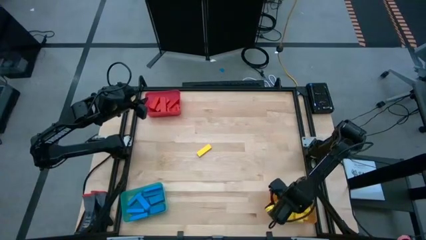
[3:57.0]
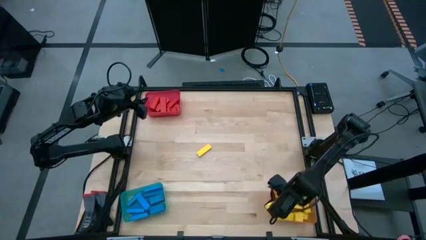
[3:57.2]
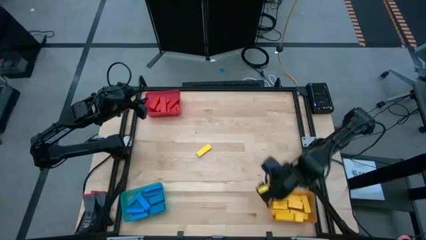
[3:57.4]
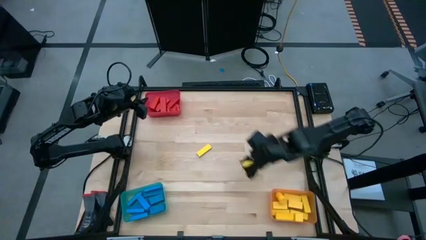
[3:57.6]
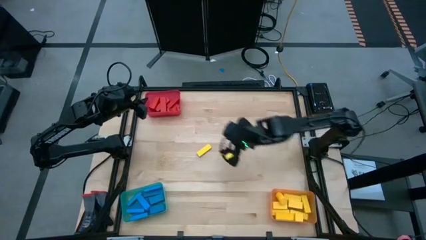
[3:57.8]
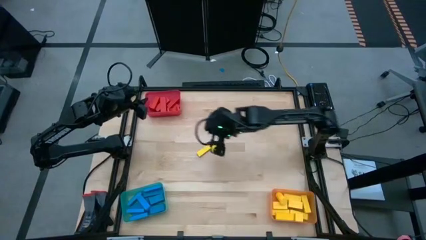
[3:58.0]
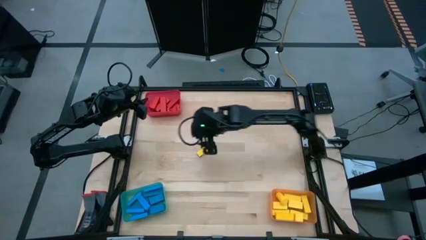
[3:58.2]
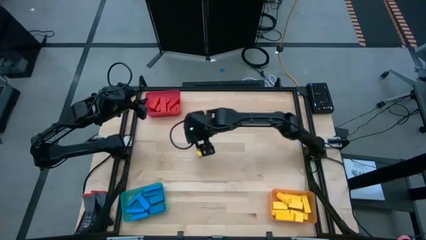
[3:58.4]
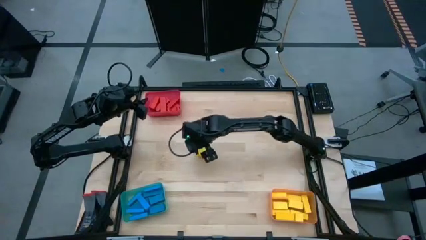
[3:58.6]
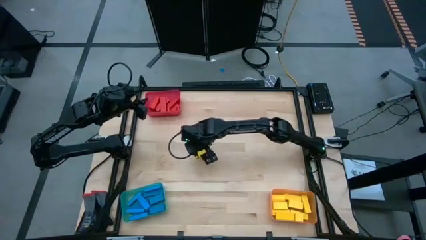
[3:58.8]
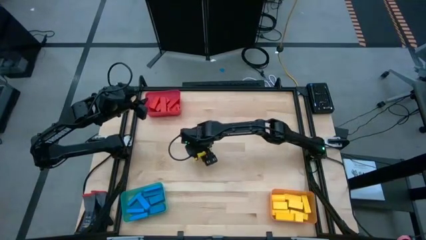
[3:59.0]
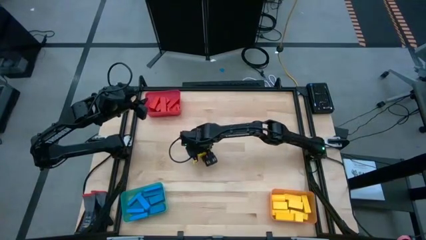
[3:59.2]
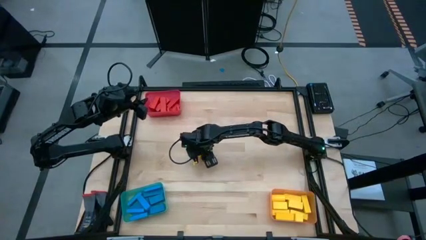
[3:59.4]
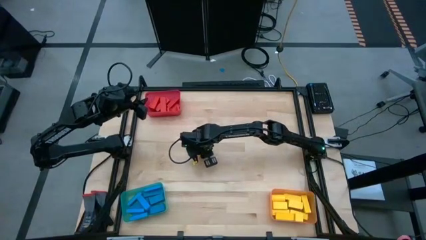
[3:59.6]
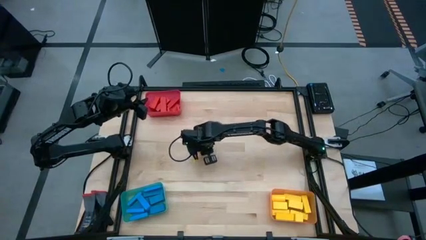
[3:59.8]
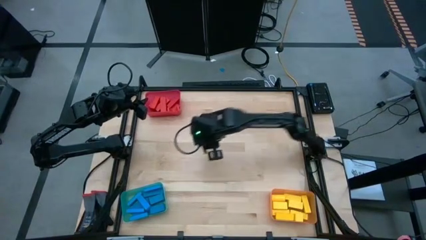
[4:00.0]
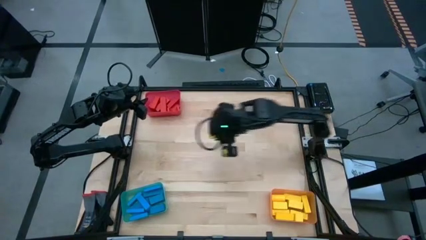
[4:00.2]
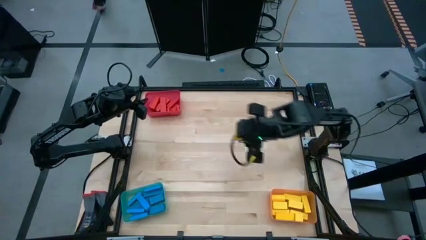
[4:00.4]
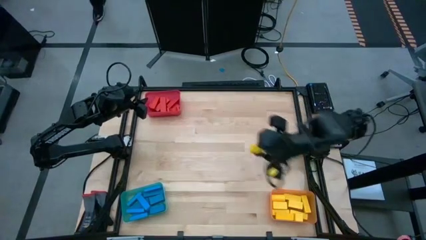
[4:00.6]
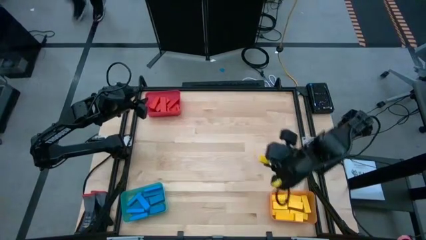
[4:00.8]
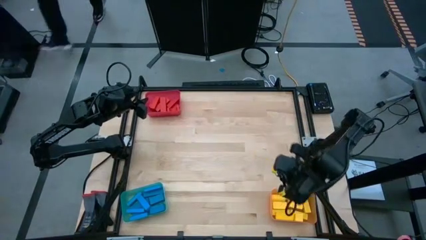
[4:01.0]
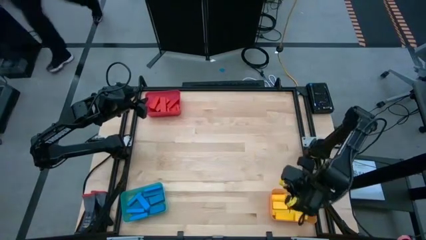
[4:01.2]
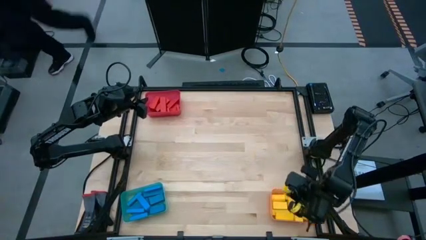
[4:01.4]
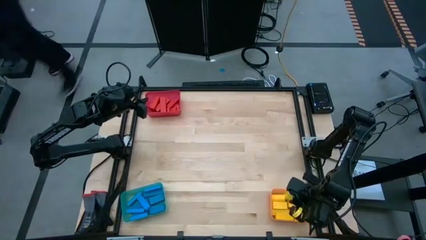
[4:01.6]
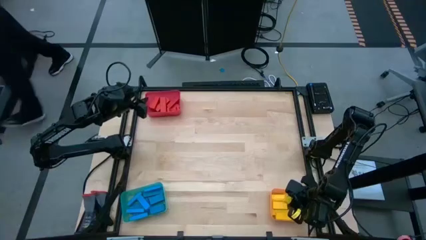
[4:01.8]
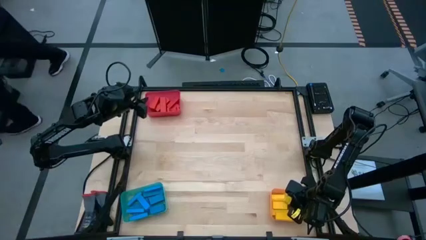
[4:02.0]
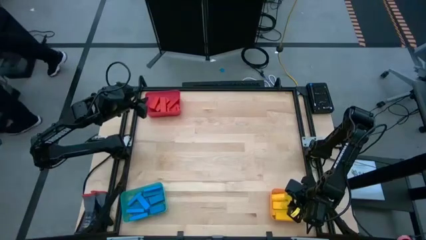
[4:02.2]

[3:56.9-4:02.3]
Task: Sort blocks
Put the yellow block into the orange bin

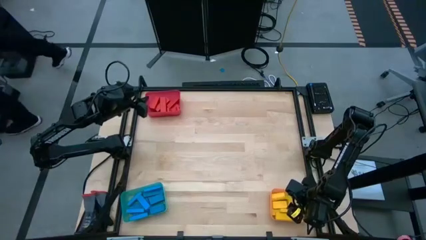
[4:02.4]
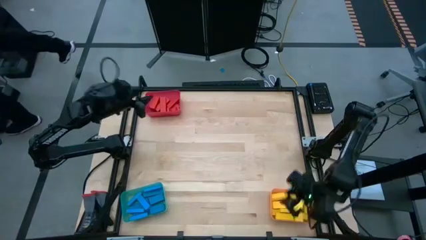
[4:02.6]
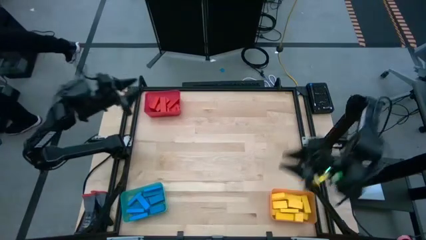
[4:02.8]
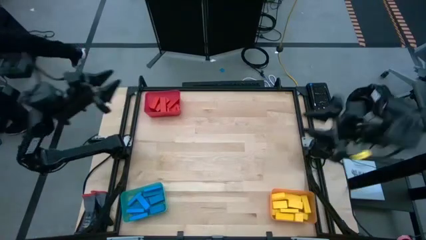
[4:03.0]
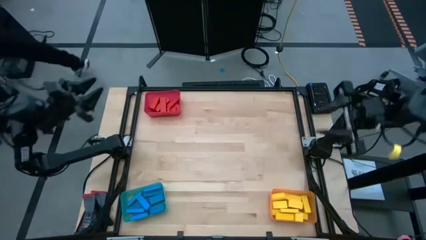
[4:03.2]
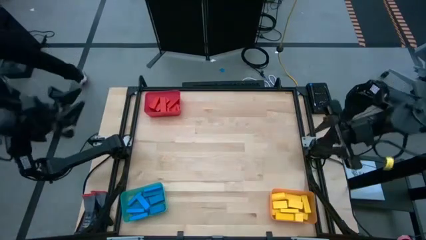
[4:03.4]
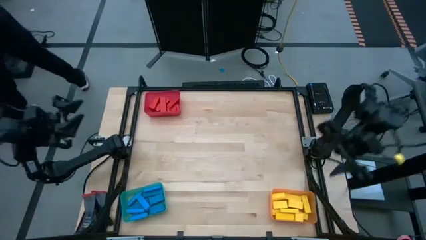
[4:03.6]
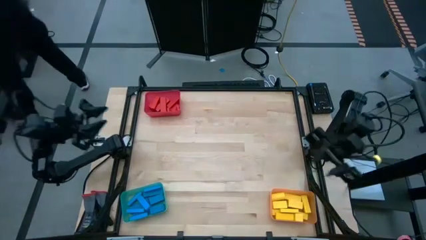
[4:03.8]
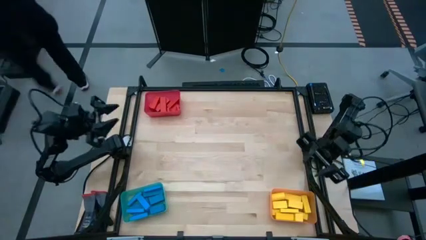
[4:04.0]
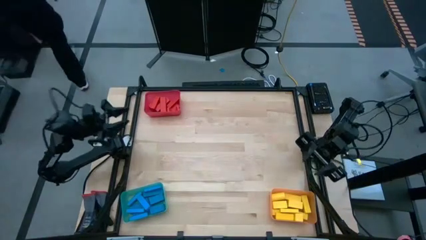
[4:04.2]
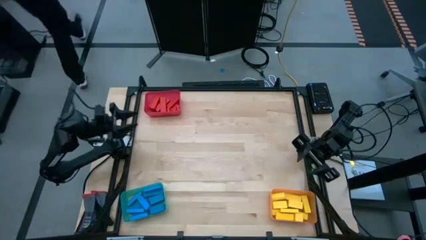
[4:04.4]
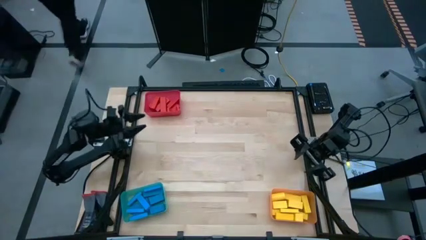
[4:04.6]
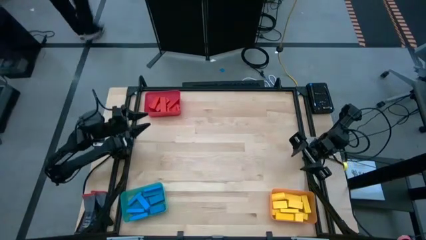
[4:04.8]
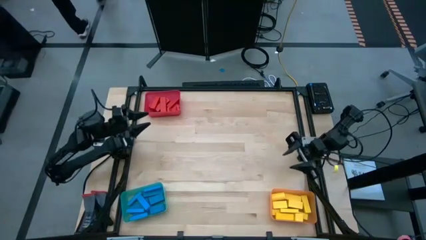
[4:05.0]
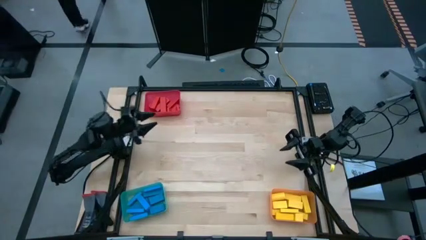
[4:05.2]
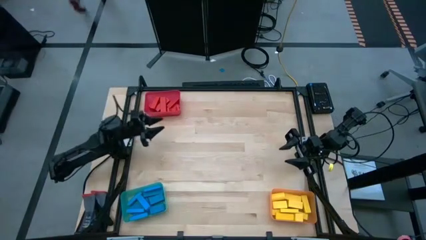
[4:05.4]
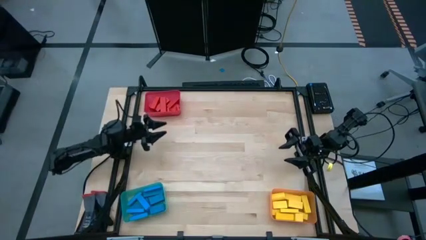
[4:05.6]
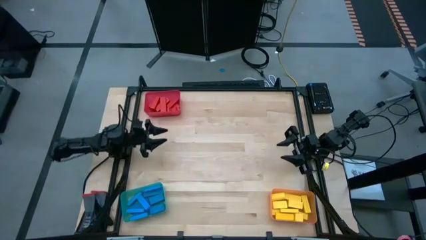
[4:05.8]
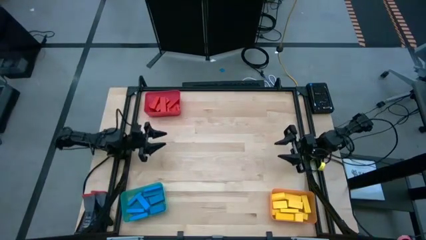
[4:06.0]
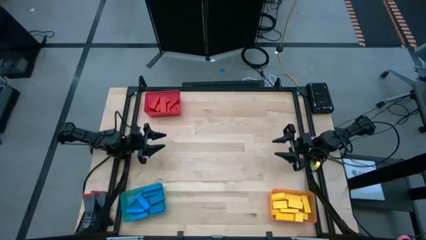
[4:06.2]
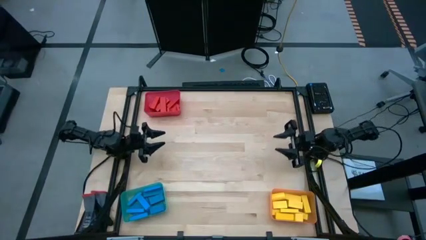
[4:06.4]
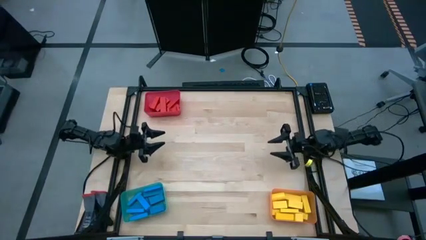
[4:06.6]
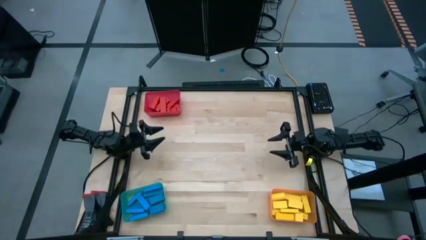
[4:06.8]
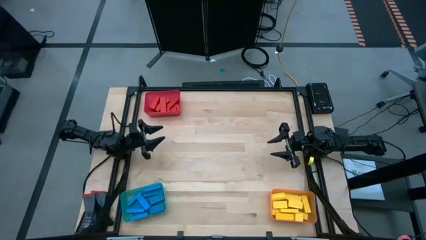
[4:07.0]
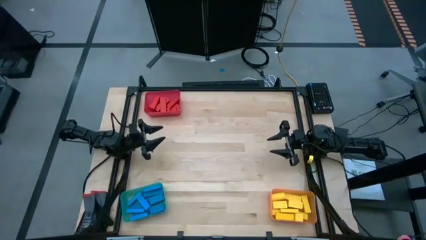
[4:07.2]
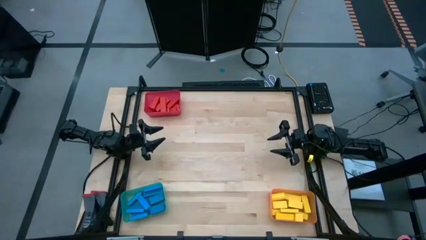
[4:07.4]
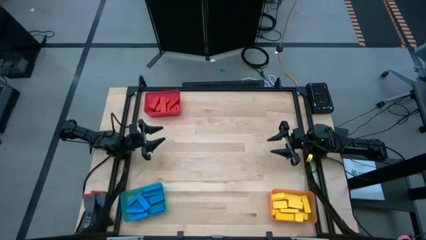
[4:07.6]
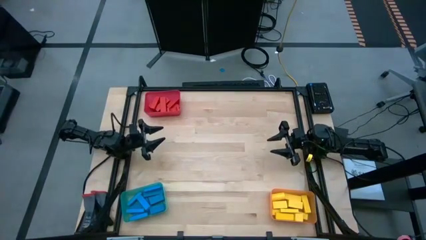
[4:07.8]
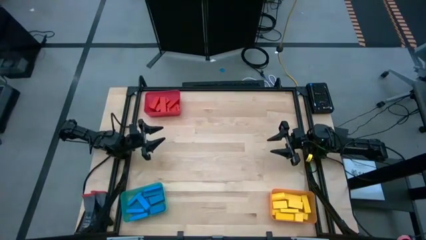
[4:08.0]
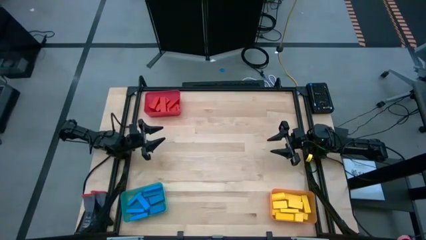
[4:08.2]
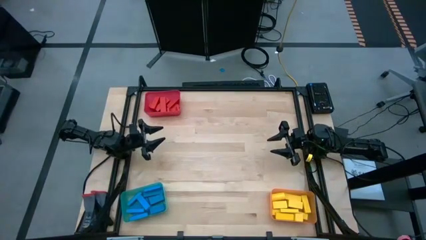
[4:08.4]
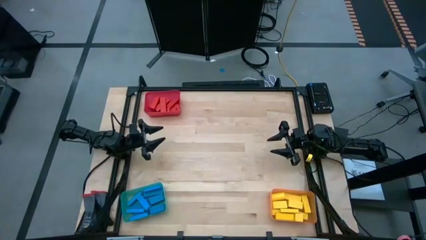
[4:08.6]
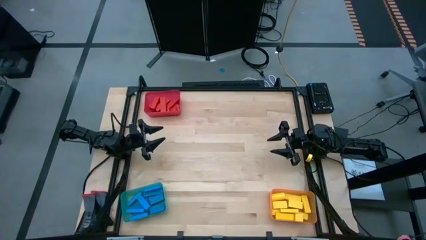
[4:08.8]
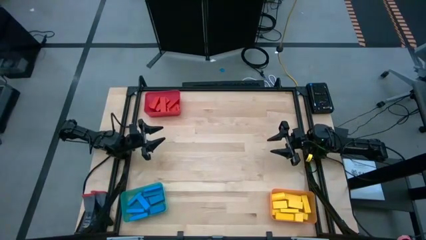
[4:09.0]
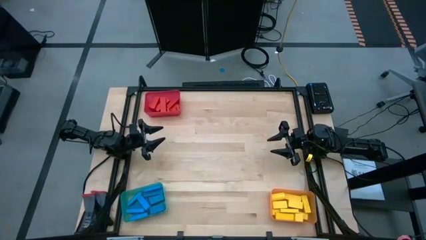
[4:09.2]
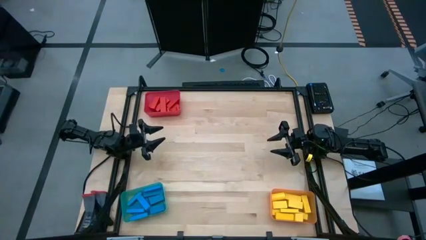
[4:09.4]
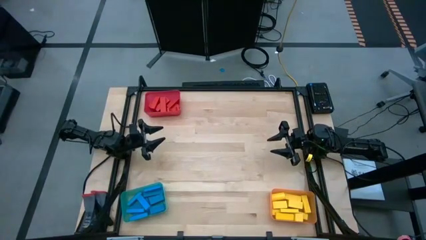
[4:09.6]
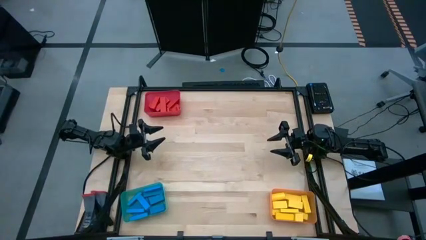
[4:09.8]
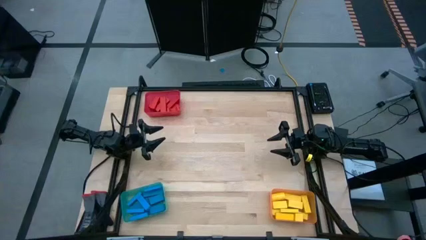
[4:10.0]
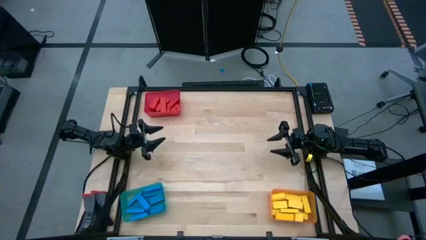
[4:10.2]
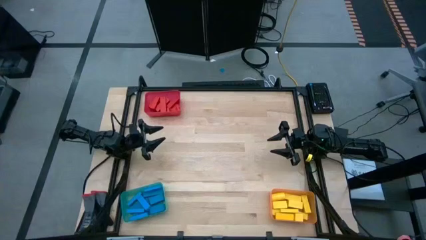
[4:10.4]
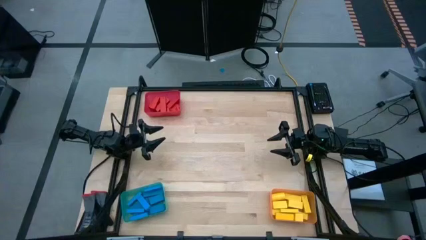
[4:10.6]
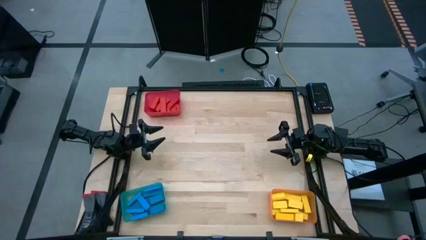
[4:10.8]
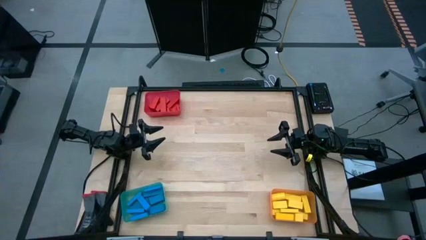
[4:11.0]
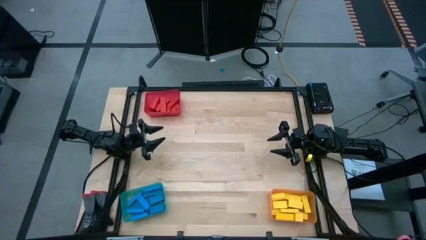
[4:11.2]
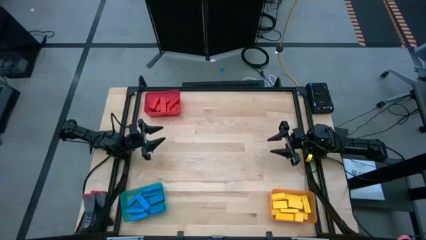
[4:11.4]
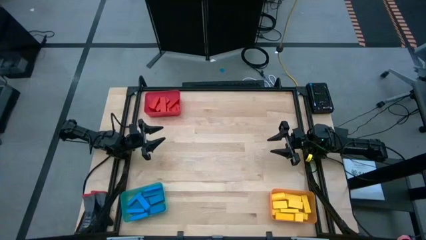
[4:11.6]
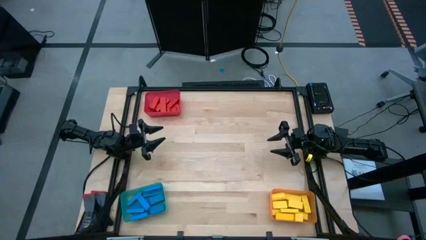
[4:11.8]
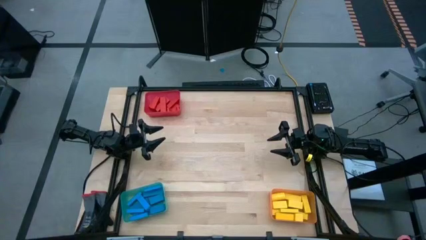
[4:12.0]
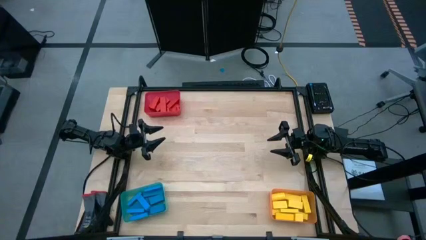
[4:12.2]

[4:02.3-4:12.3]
Return to Home Position

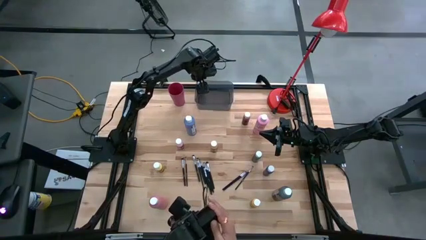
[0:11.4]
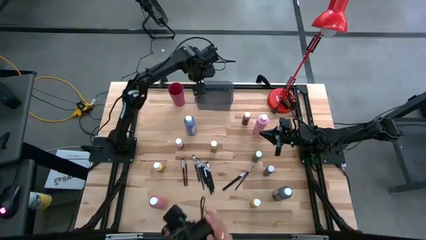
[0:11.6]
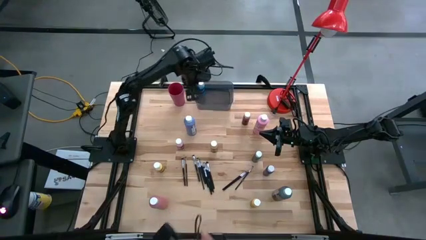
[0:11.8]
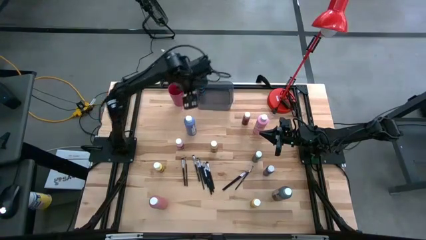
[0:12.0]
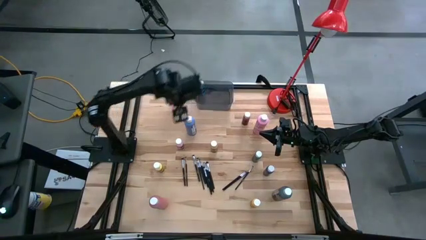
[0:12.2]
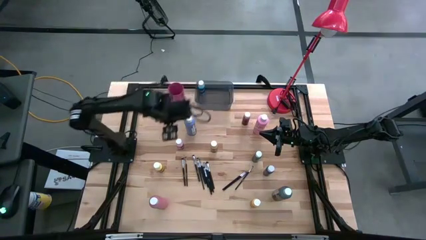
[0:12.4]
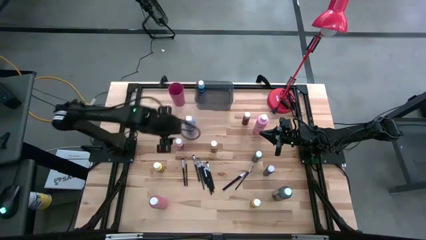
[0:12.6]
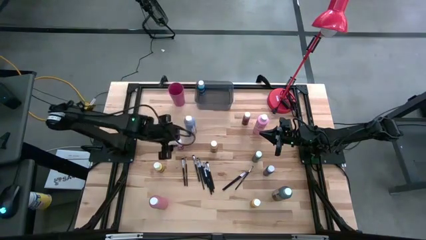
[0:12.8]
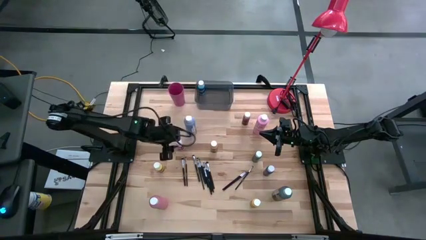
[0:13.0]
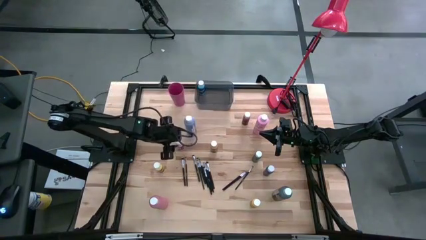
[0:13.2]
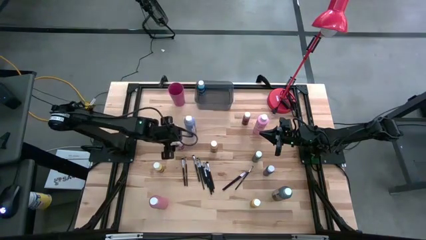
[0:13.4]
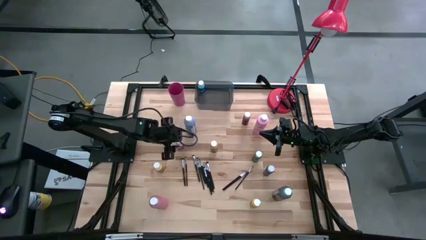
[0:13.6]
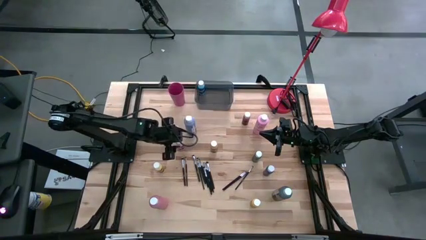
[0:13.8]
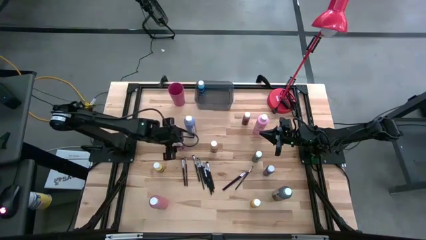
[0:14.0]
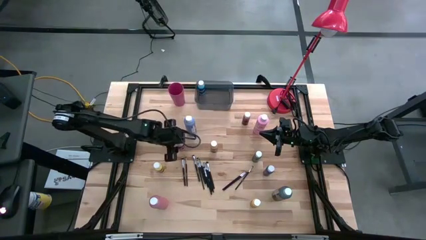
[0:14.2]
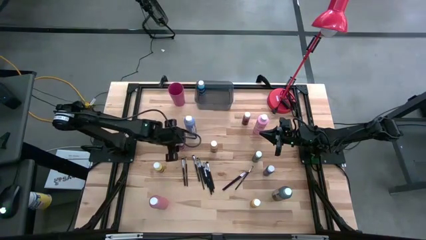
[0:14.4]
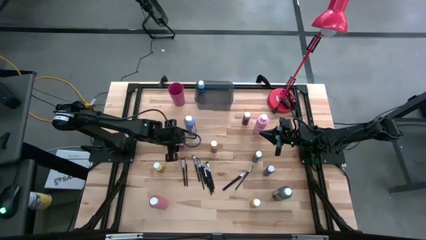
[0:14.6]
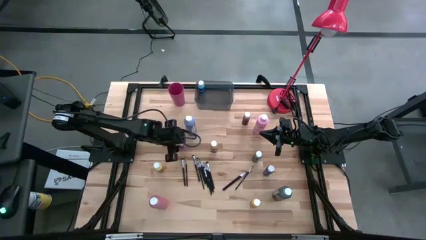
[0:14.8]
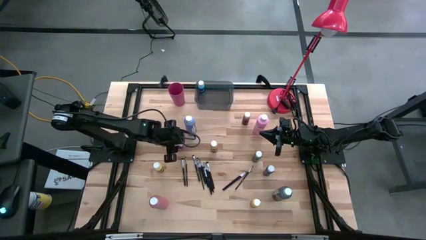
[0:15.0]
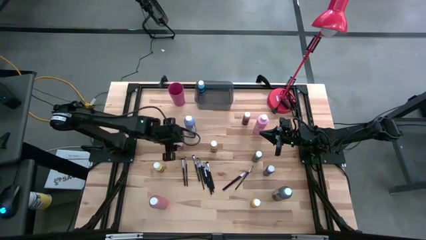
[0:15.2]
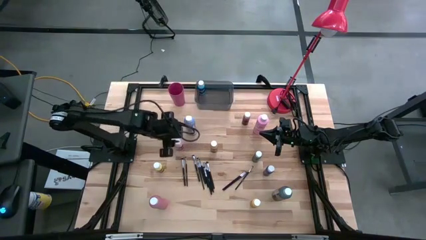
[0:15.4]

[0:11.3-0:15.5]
Task: Pick & Place Paint Supplies
Put the pink paint bottle into the black bin
